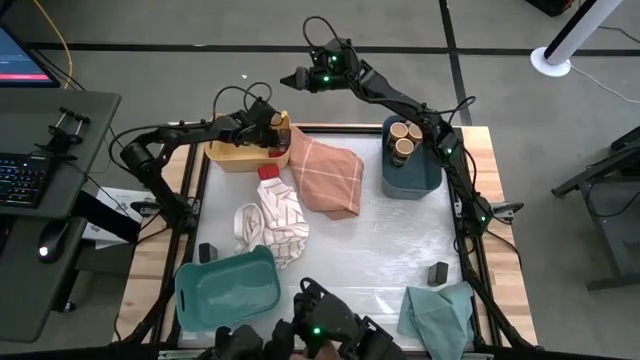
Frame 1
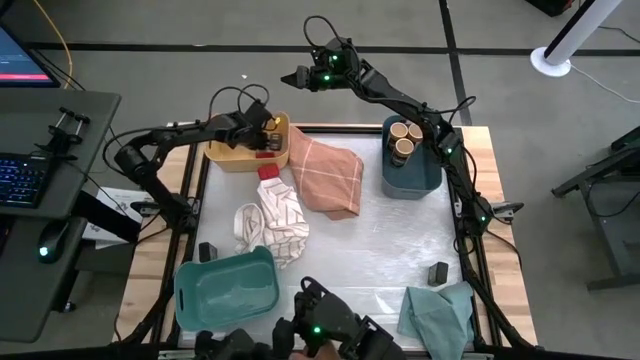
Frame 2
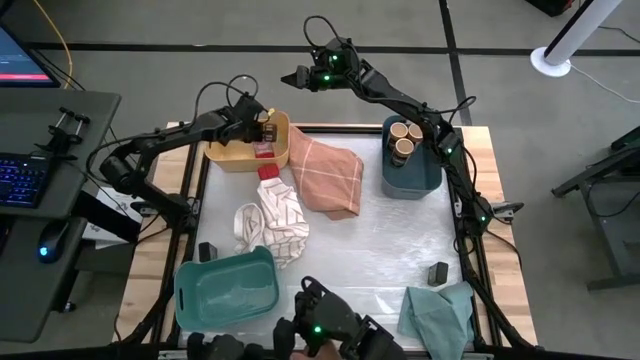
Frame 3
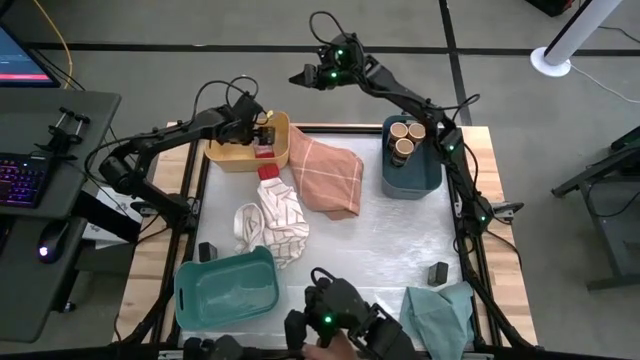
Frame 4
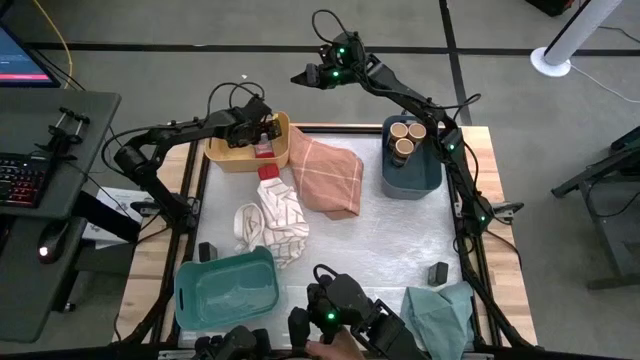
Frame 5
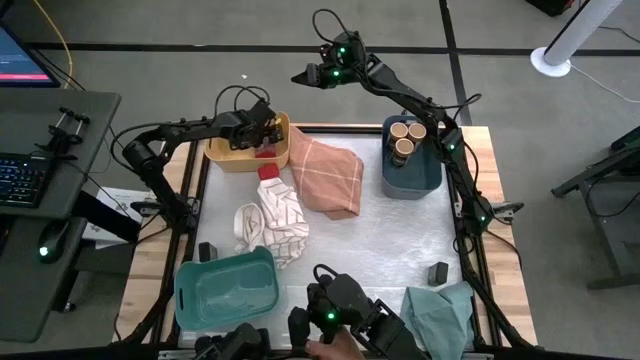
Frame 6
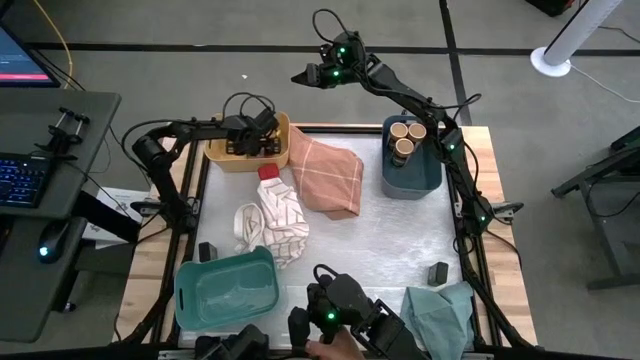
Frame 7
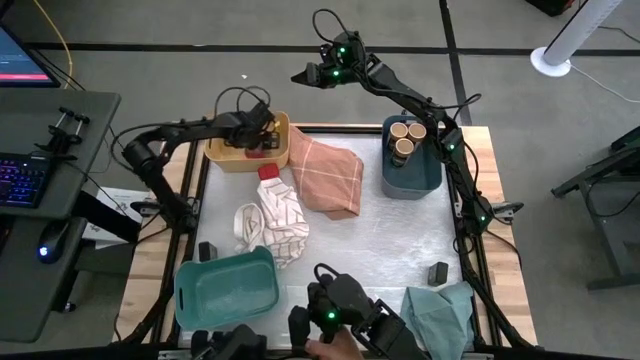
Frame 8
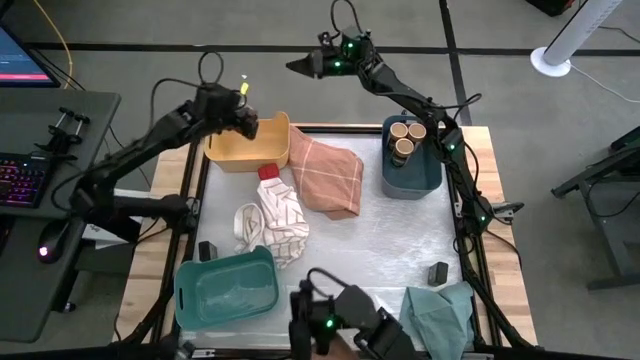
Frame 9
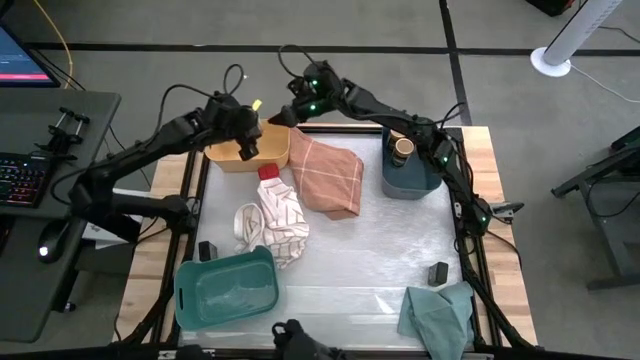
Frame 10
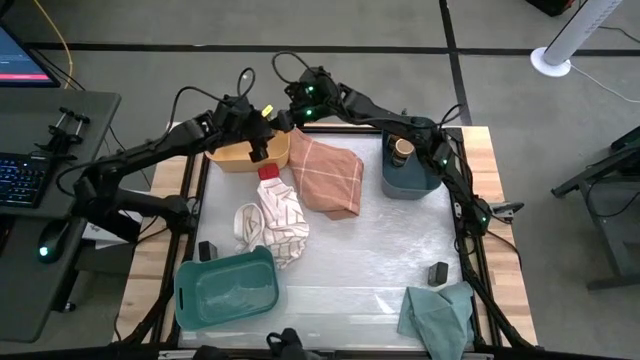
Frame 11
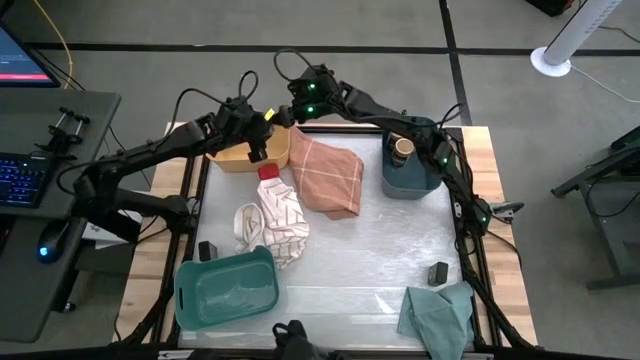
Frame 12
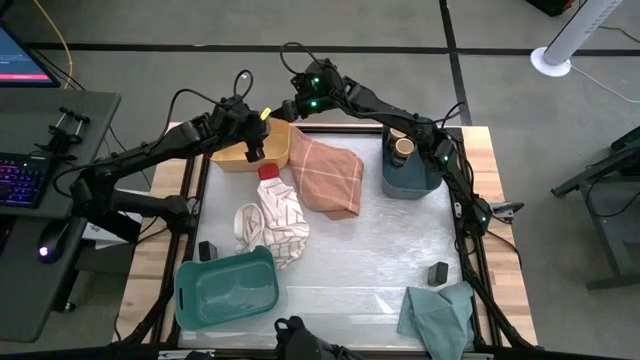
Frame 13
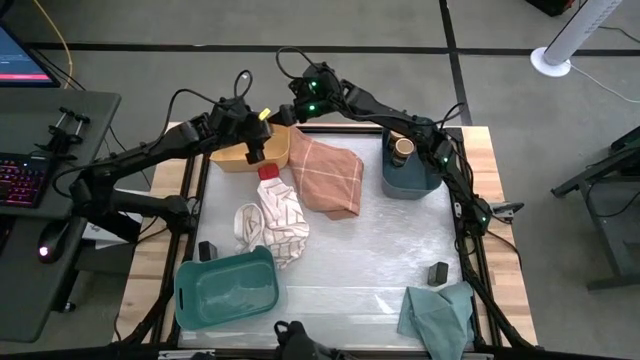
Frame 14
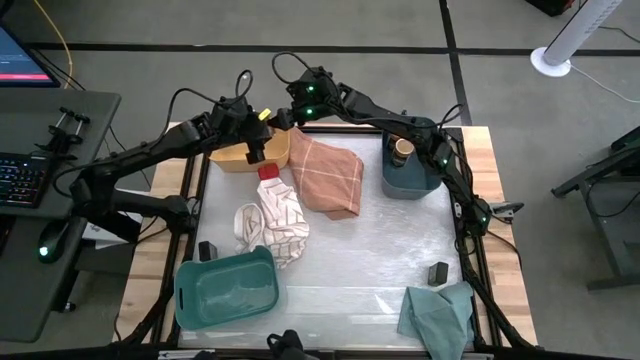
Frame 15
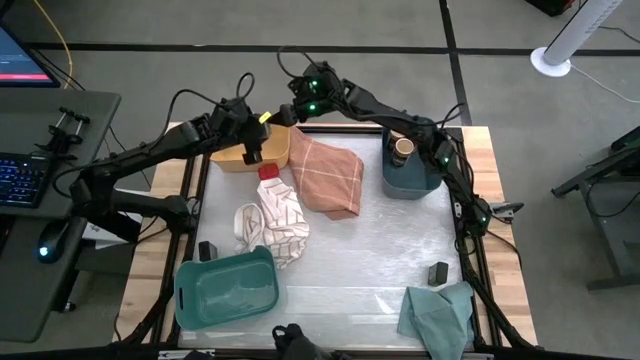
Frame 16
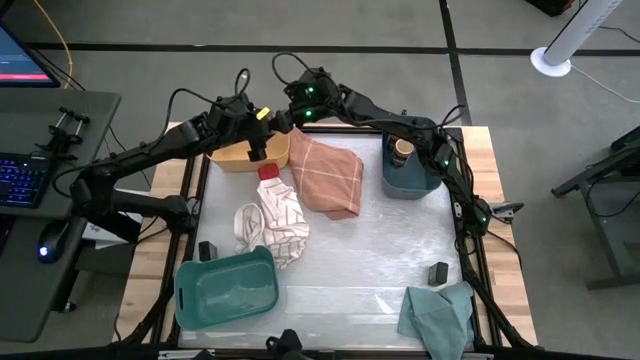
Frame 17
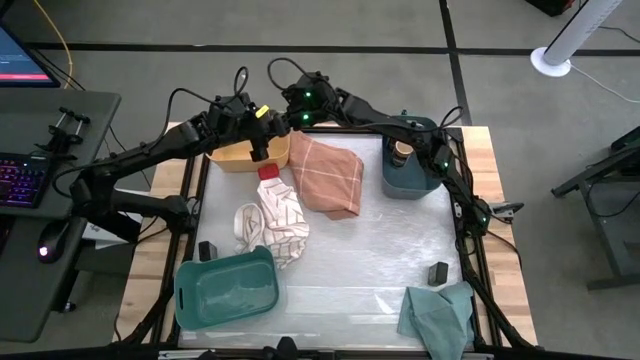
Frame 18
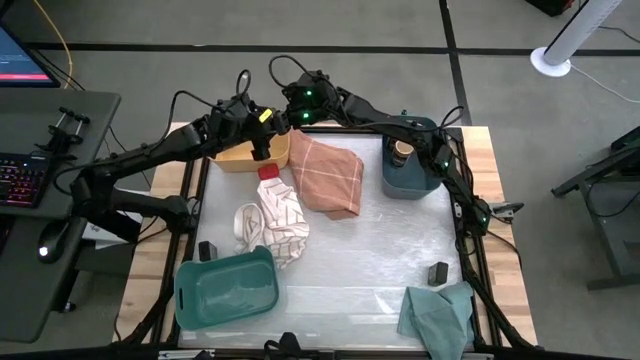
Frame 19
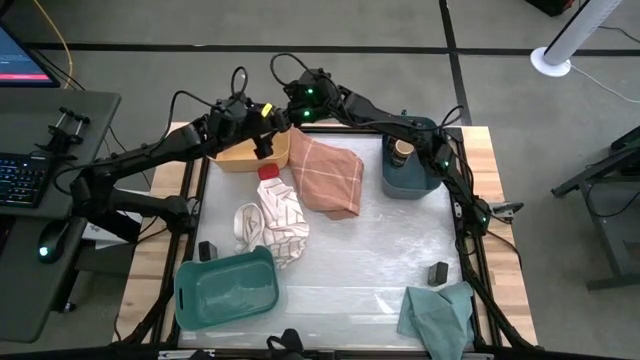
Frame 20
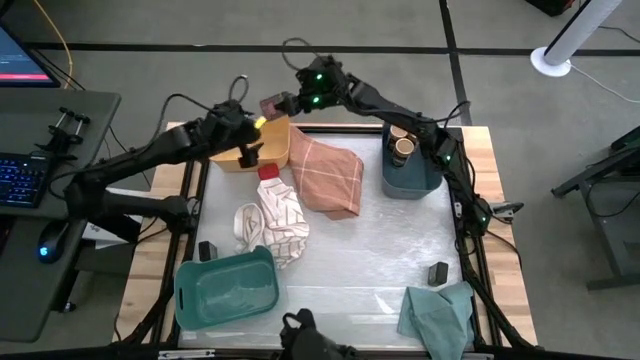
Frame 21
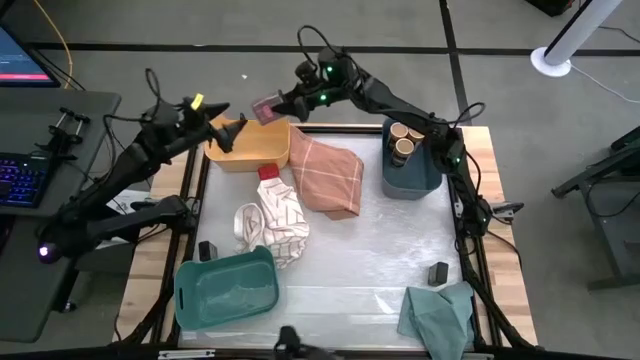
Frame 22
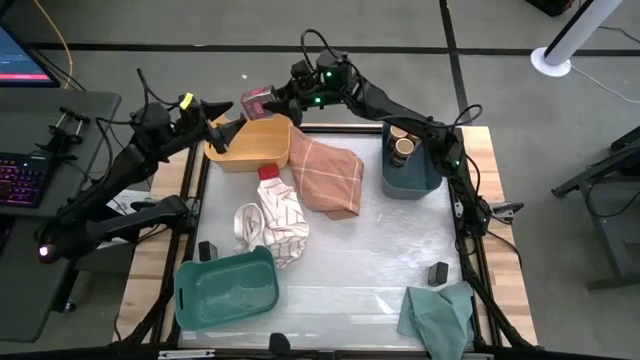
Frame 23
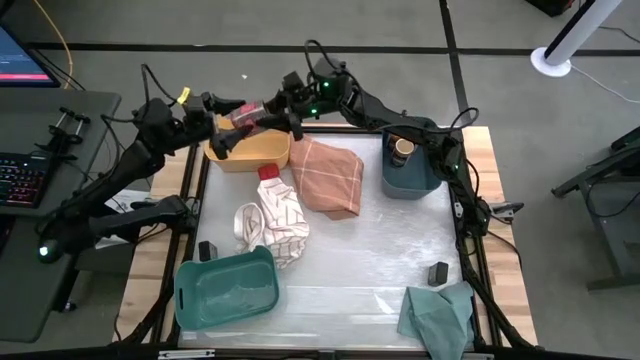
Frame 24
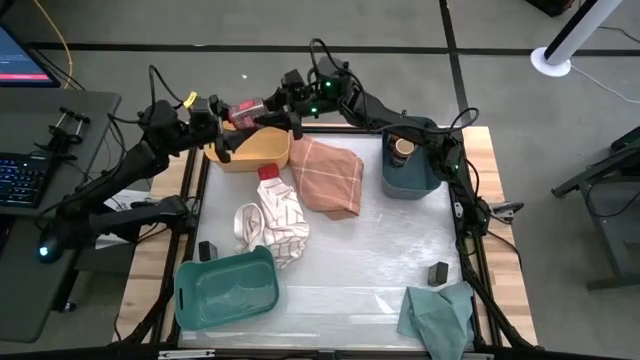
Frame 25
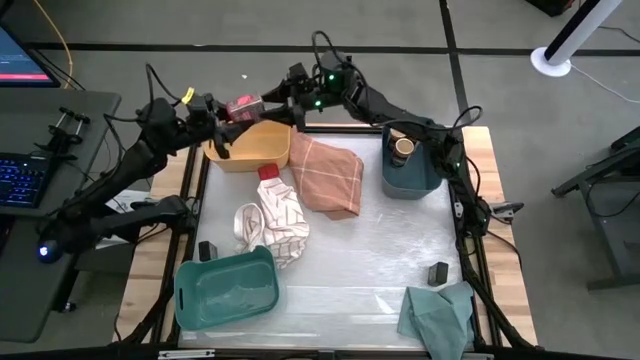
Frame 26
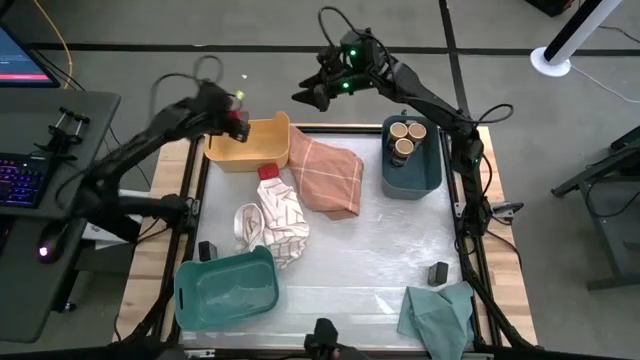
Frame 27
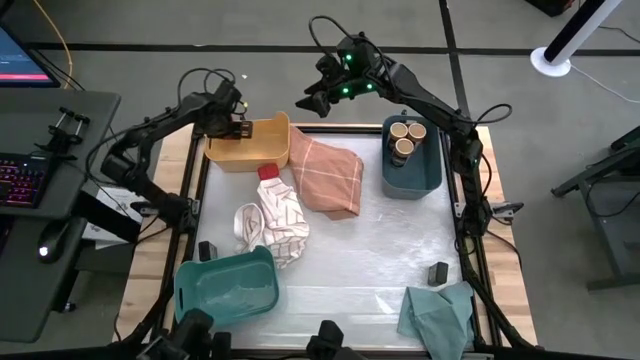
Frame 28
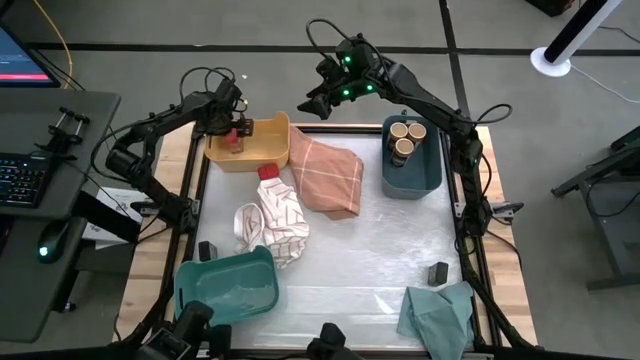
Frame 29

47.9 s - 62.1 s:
Task: Sort spices by type
Put the right red seasoning can into the yellow bin

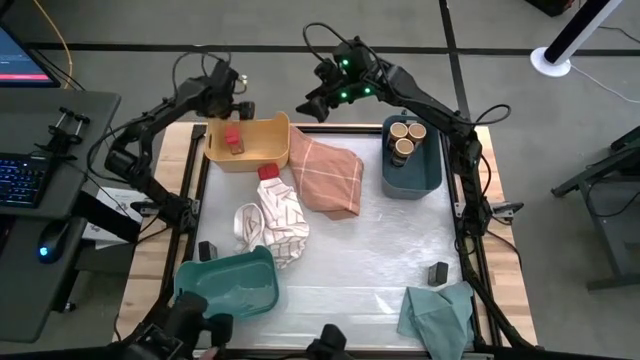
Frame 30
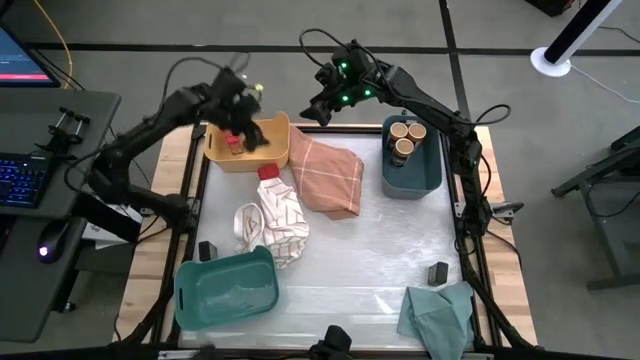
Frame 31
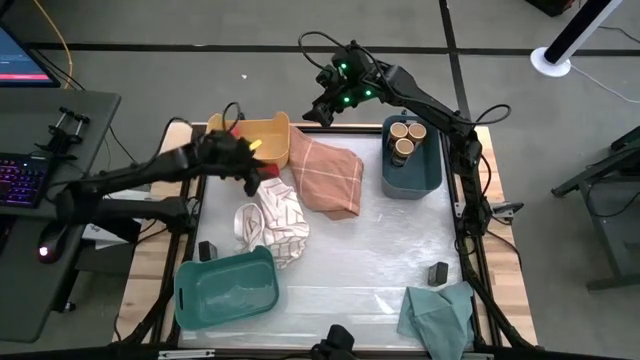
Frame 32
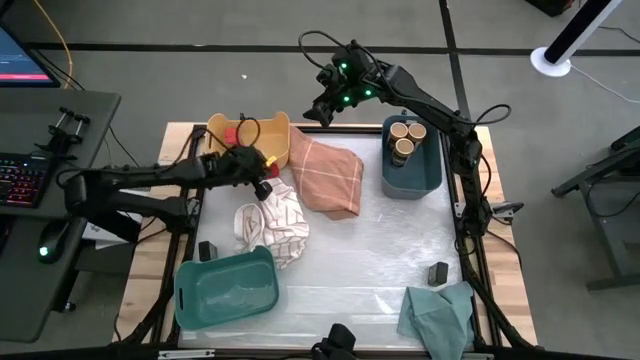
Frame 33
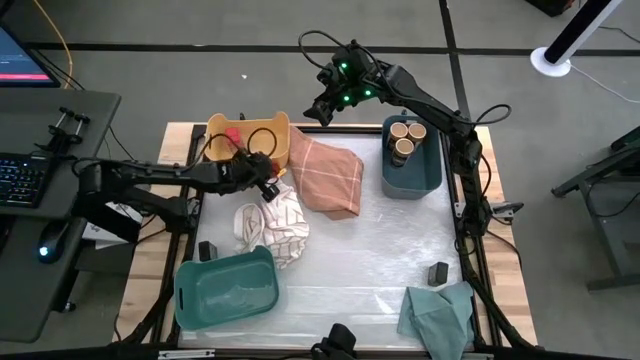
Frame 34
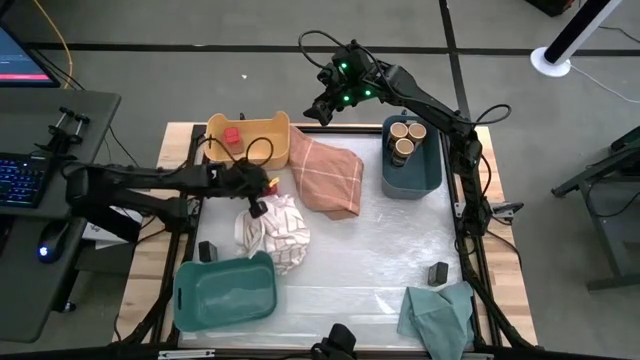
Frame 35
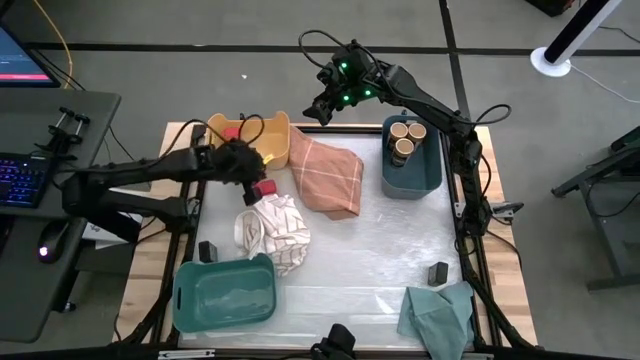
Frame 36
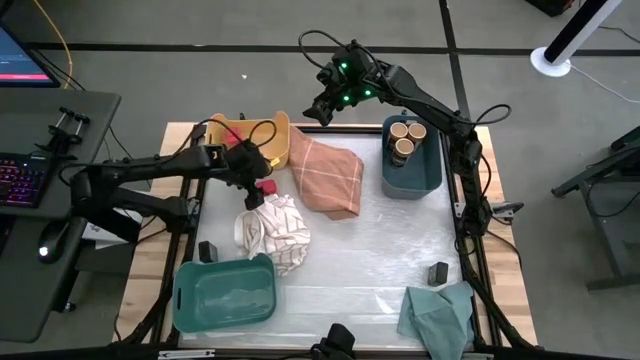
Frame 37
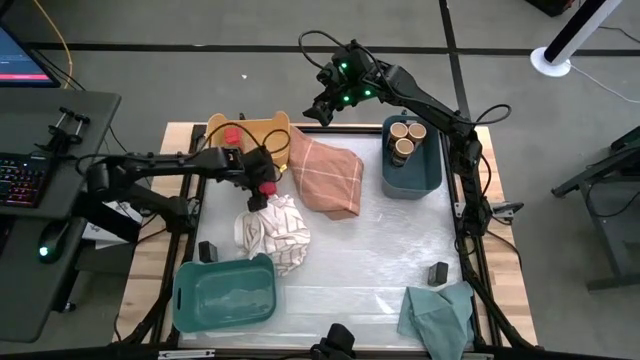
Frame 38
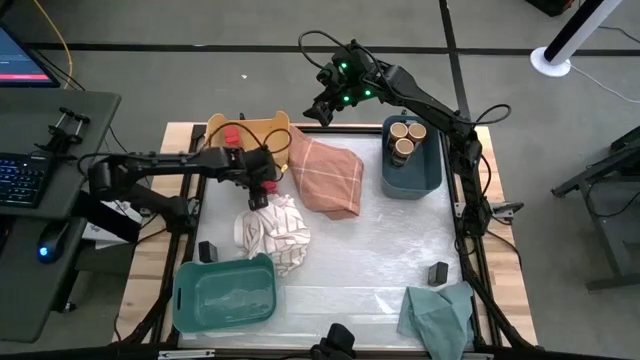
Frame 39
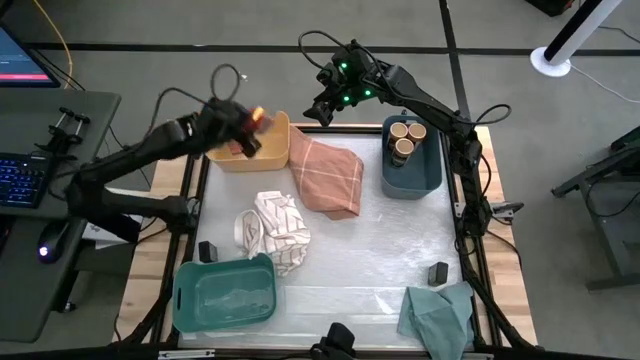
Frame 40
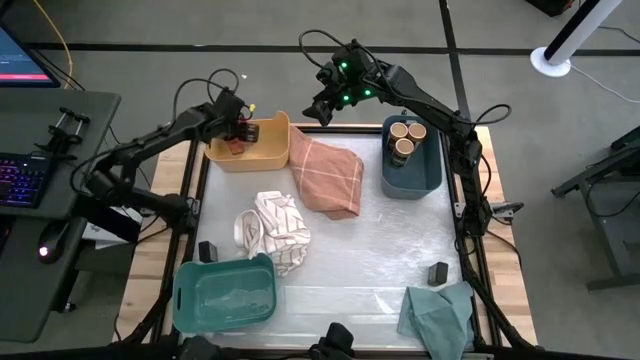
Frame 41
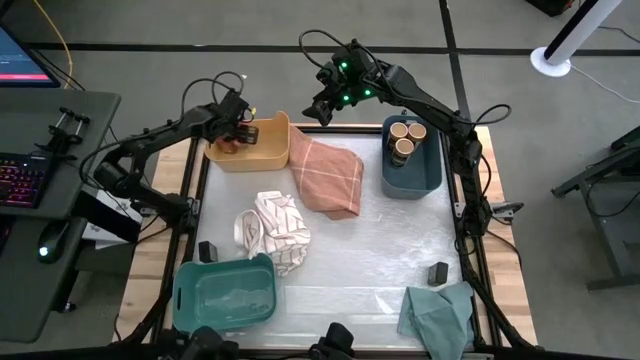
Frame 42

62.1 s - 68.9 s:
Put the red seasoning can into the yellow bin

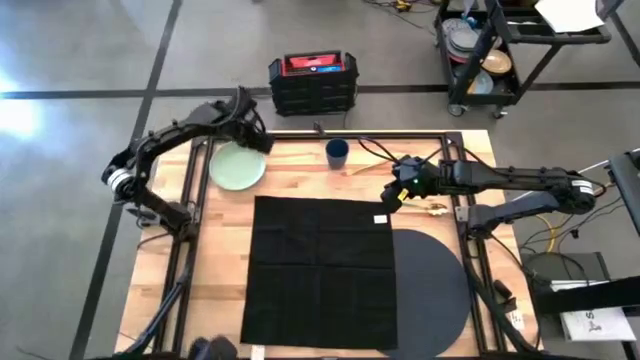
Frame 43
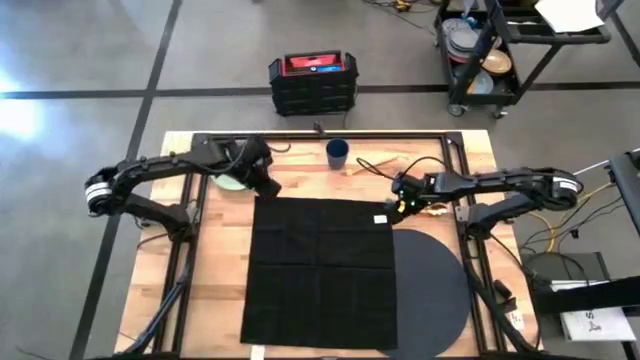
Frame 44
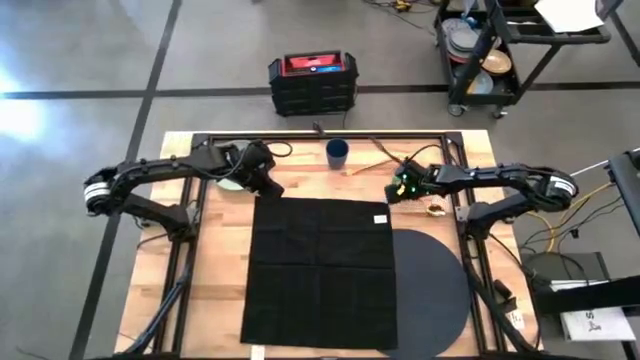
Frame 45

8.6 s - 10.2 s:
Task: Set table place
Adjust the green spoon
